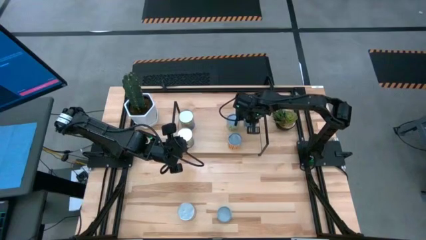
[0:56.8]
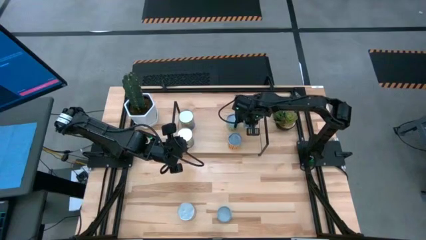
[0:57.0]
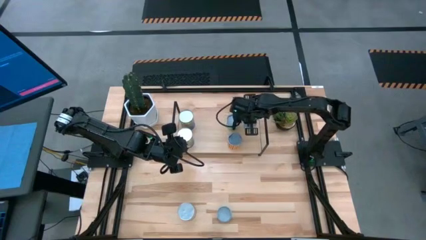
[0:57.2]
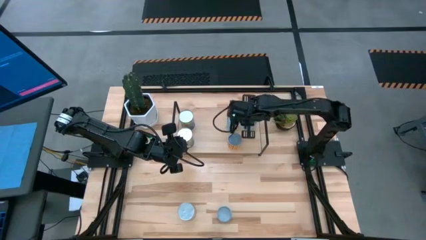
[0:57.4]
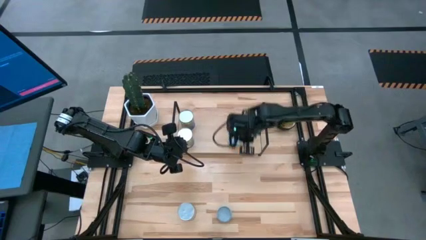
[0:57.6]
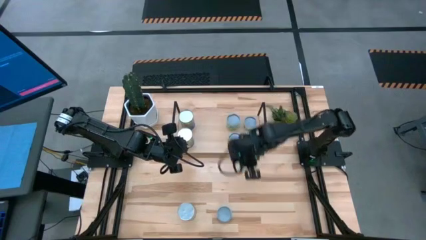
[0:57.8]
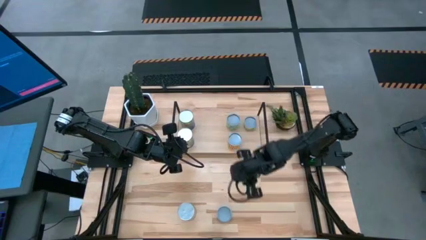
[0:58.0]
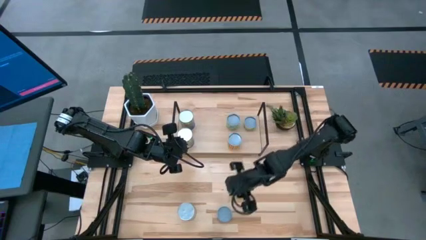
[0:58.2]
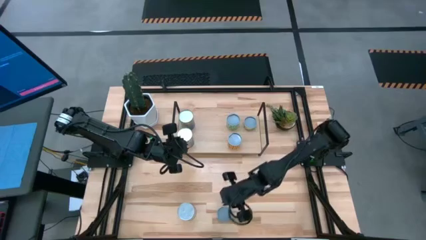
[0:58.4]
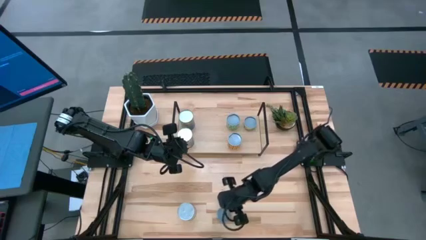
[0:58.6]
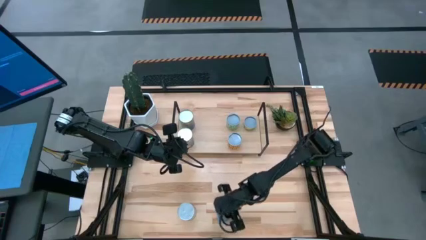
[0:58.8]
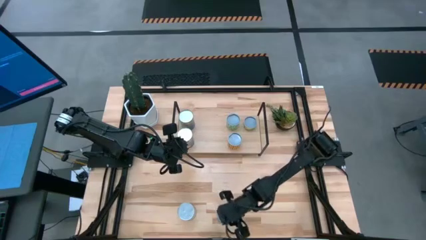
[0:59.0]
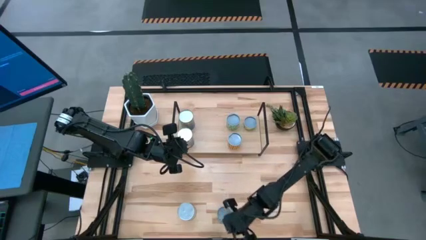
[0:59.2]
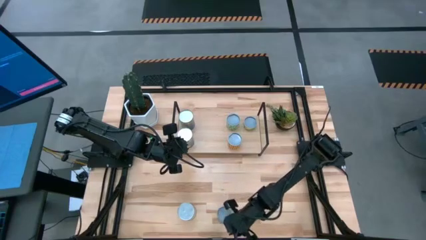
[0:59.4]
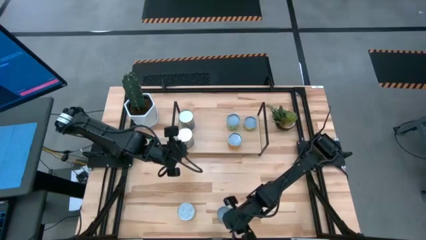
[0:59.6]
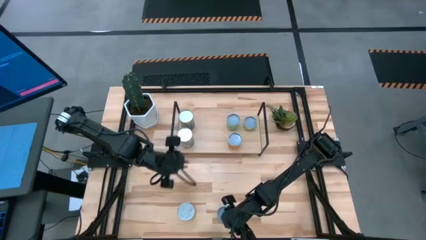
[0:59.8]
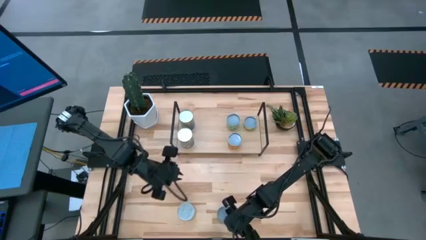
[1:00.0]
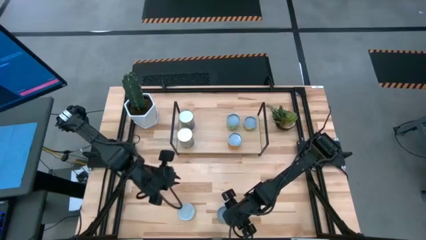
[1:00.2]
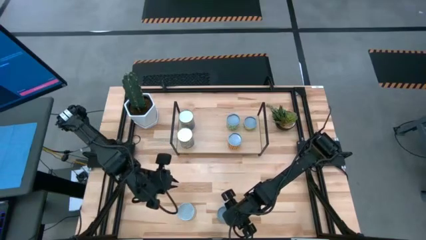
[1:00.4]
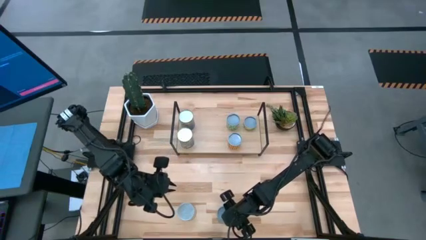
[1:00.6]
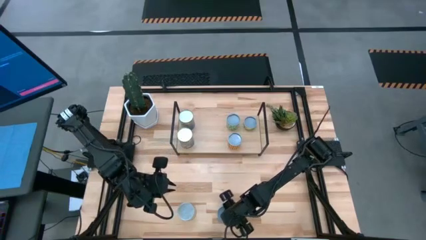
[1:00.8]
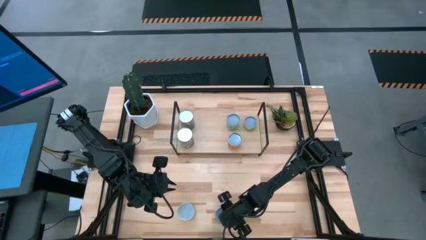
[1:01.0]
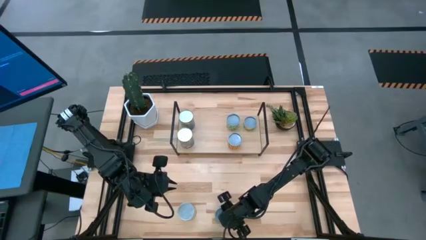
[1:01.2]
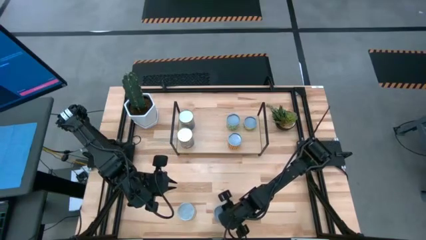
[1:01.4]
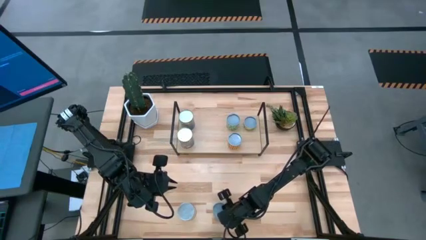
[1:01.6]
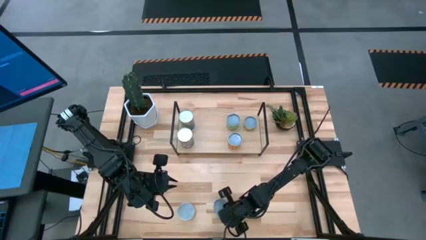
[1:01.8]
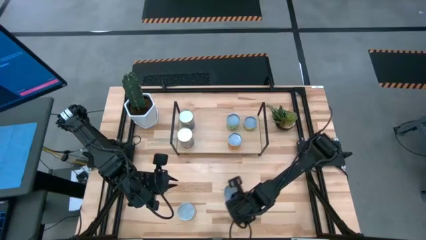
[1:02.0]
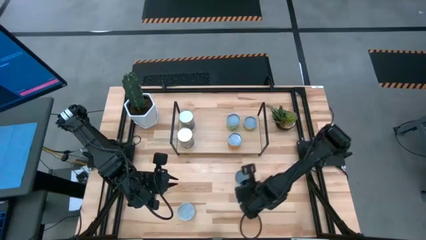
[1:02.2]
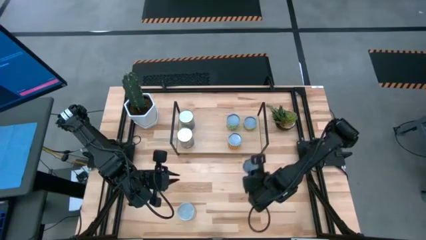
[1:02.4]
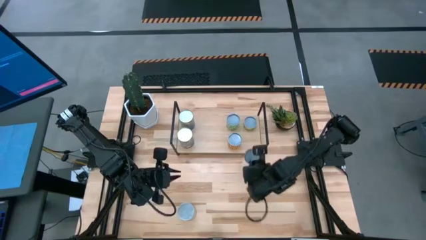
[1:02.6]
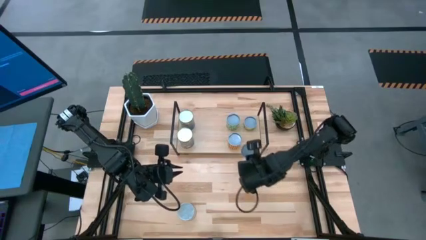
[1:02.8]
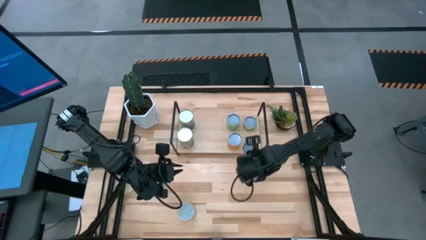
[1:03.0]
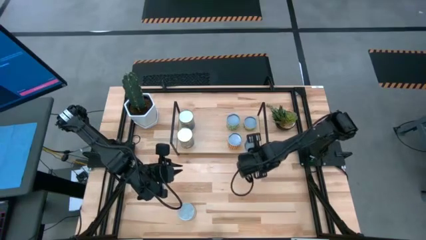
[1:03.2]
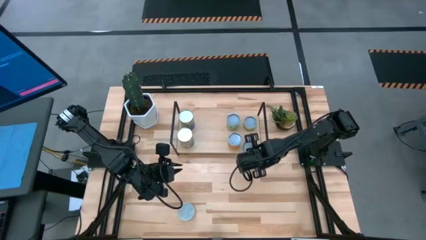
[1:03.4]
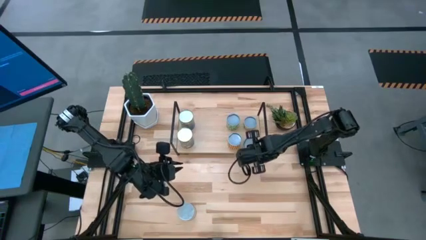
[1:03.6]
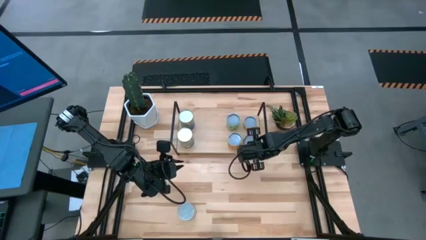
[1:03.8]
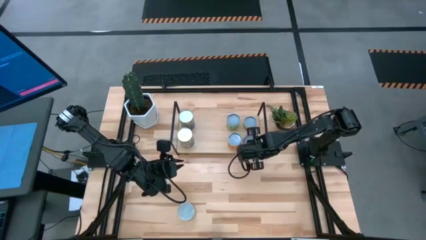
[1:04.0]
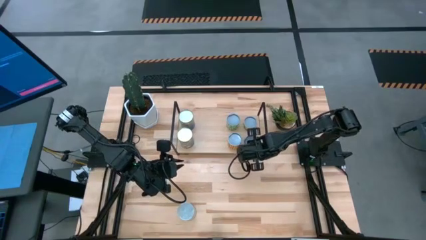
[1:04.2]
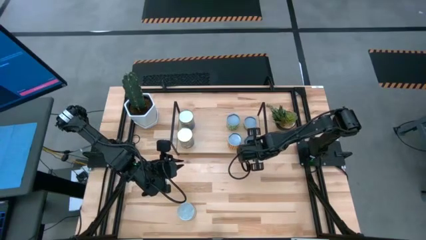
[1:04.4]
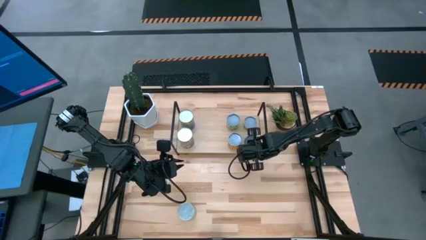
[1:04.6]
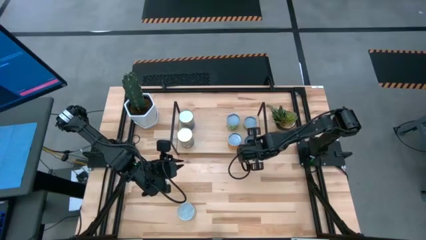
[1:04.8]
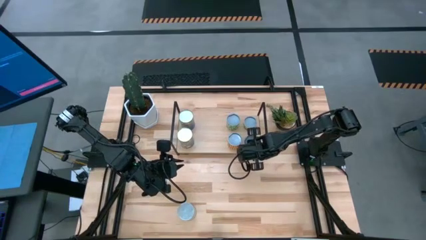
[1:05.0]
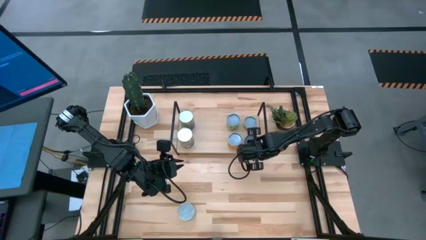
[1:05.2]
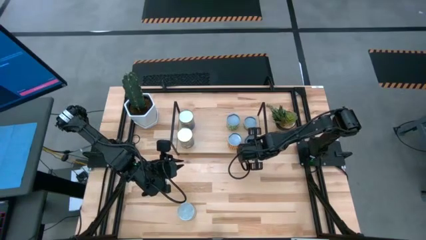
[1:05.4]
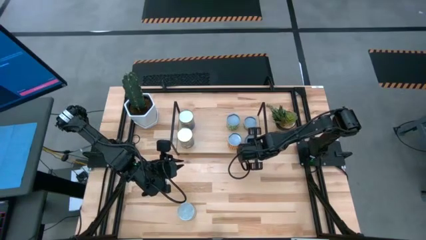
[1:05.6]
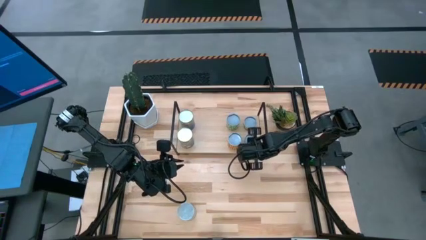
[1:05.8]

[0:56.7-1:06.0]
Task: Pick and place cans onto a shelf
Put the canned tuna on the shelf

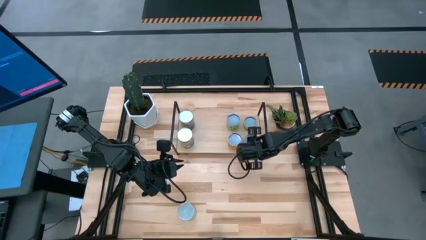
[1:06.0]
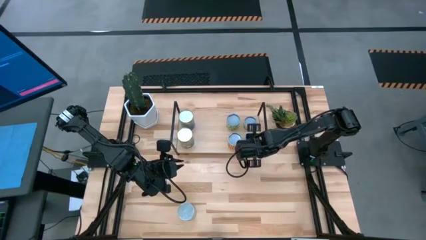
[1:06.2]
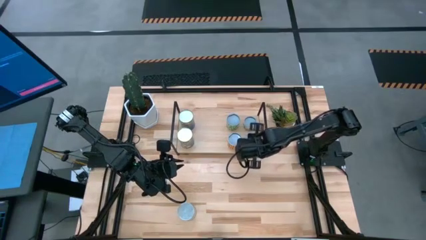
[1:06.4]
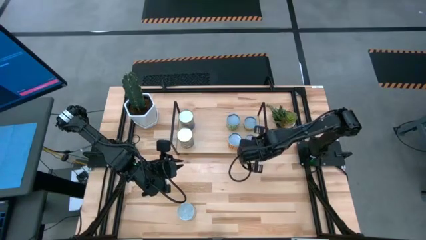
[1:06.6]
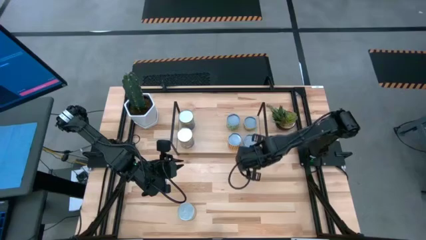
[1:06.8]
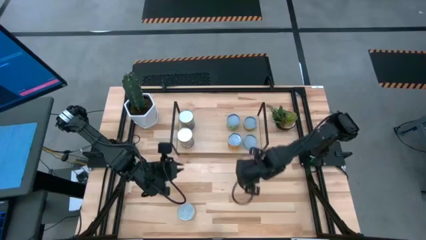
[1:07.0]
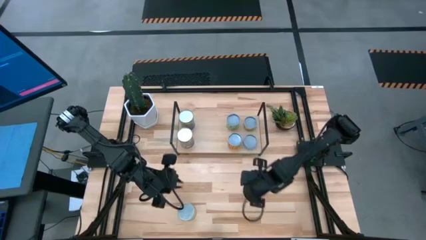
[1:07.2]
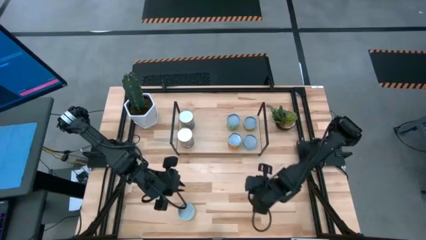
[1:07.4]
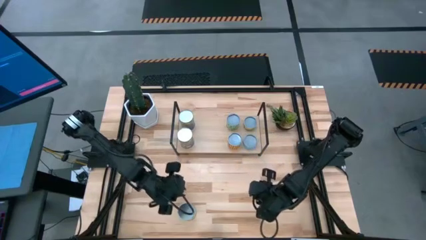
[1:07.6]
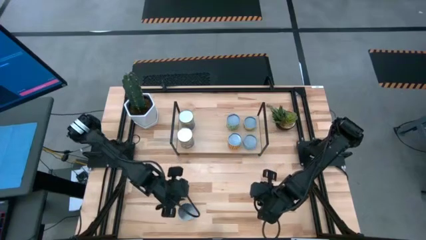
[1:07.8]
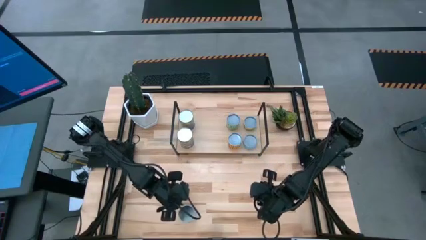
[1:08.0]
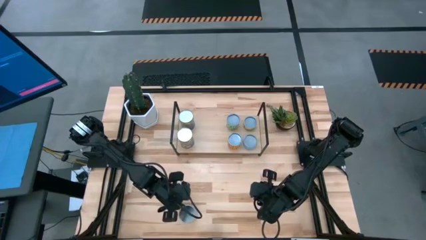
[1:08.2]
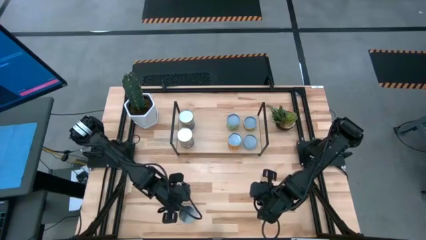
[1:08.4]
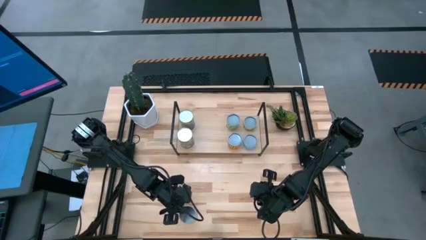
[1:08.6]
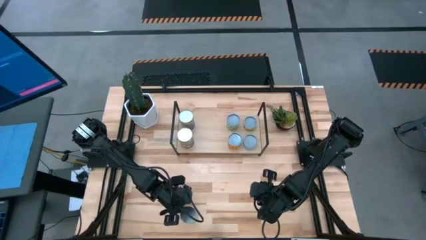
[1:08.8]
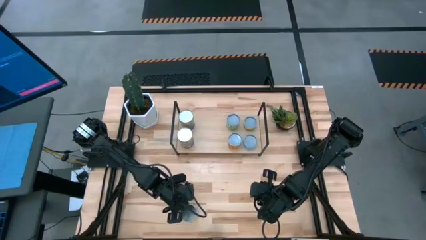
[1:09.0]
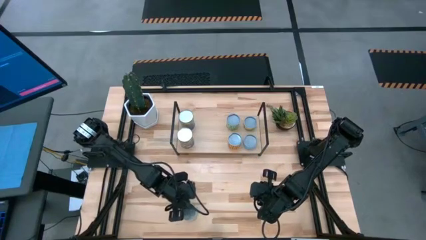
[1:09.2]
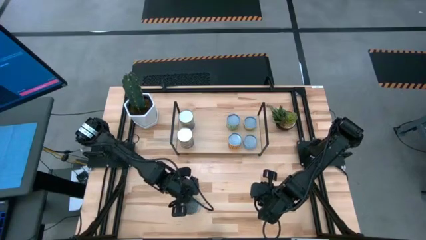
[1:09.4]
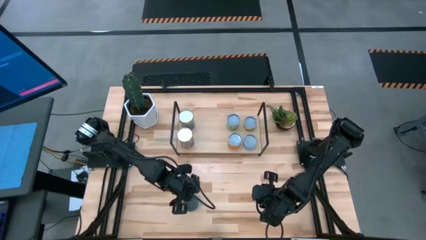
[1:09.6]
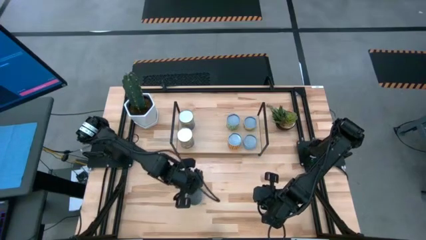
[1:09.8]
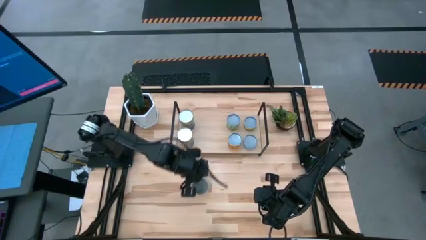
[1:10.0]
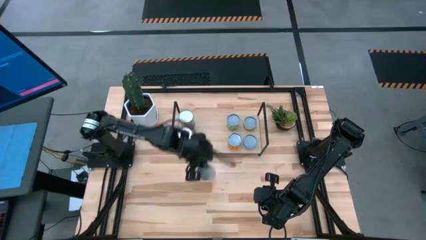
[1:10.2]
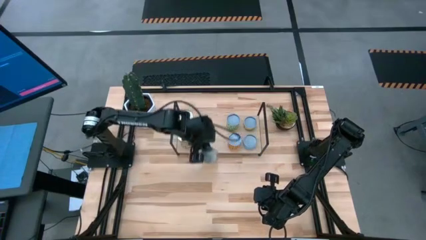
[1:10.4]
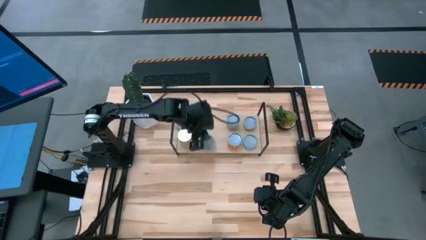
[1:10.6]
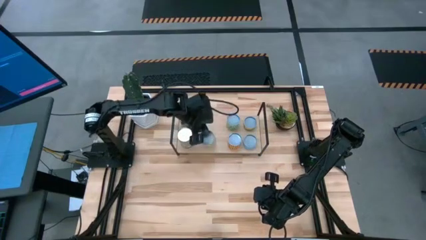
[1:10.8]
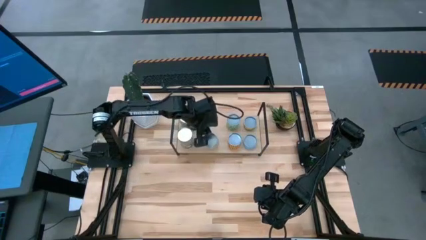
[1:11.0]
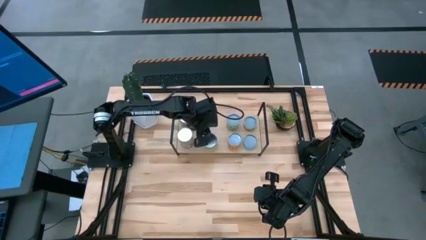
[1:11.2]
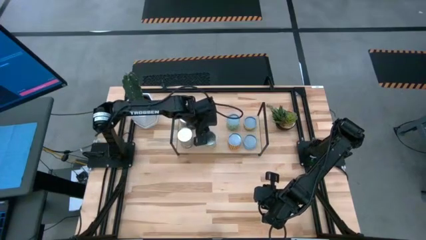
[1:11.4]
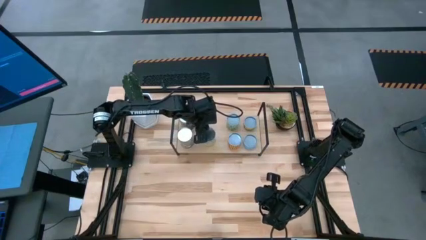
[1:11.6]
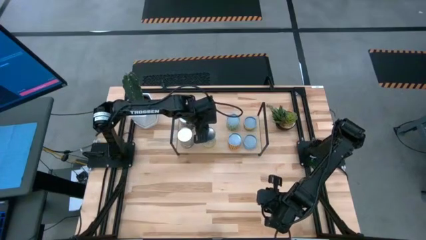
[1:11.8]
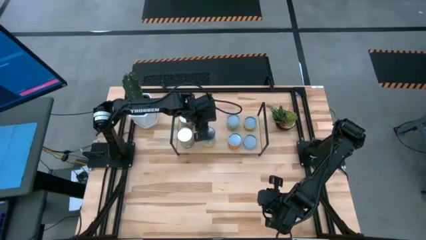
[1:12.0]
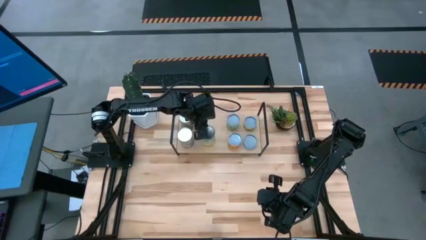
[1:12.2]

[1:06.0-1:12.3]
Put the canned carrots on the shelf
